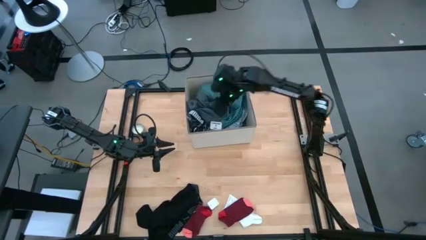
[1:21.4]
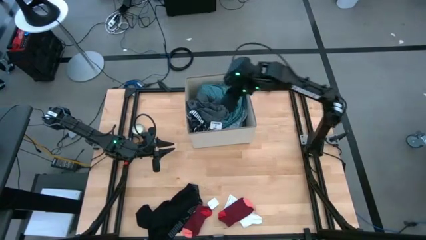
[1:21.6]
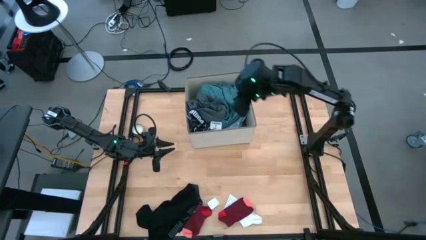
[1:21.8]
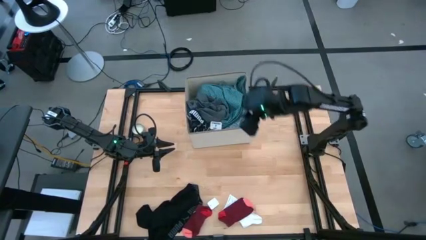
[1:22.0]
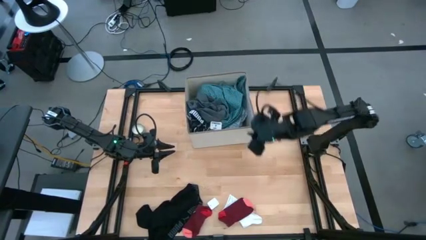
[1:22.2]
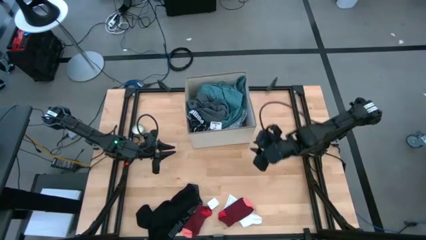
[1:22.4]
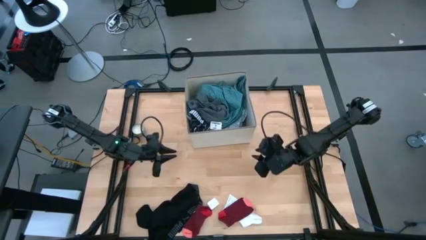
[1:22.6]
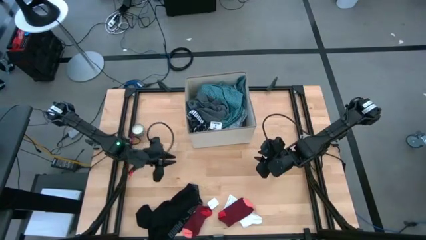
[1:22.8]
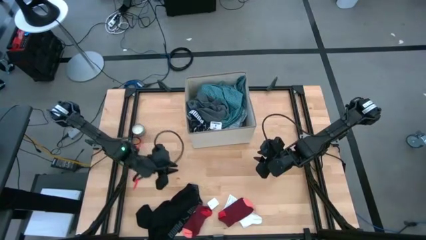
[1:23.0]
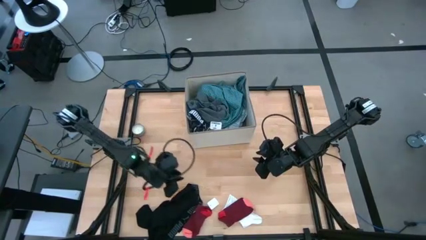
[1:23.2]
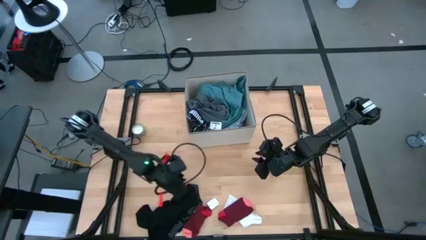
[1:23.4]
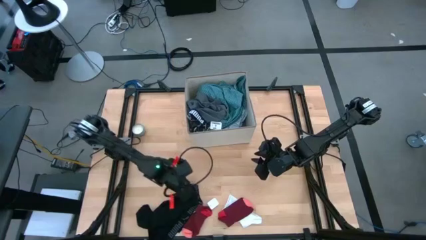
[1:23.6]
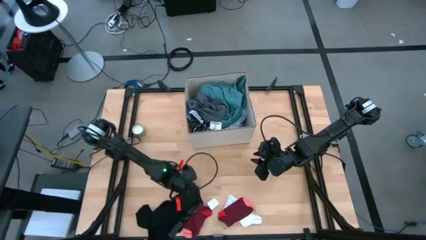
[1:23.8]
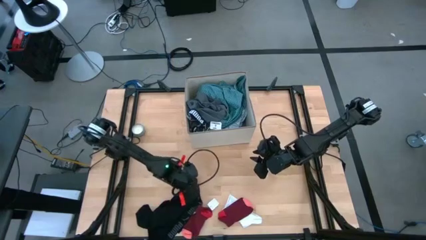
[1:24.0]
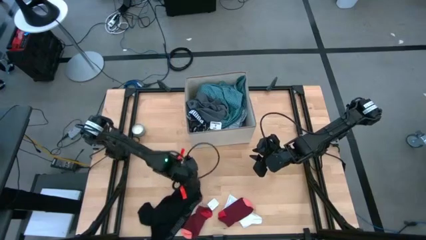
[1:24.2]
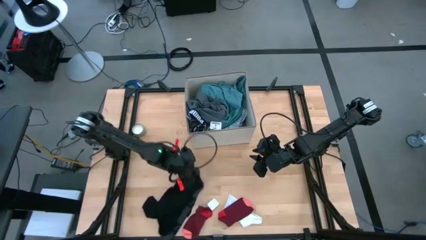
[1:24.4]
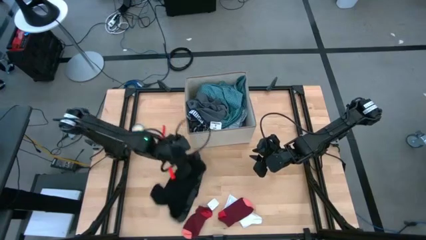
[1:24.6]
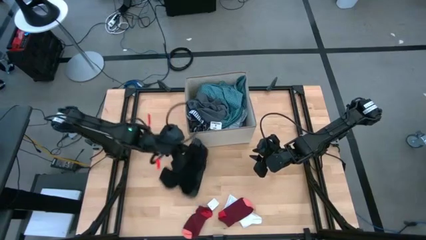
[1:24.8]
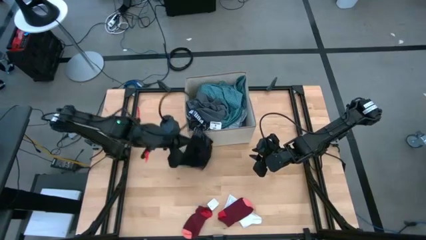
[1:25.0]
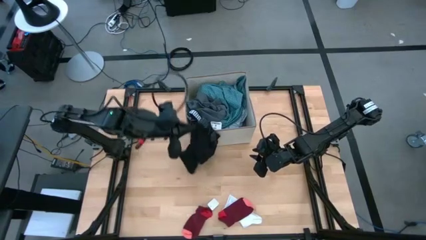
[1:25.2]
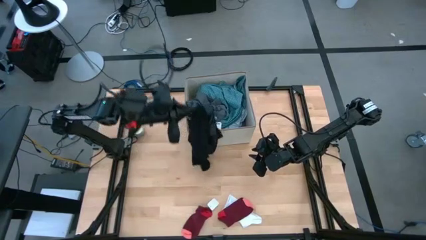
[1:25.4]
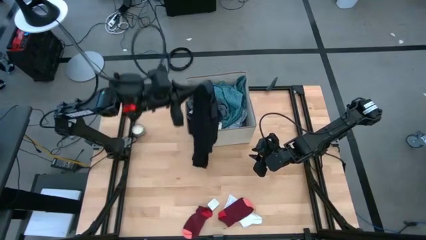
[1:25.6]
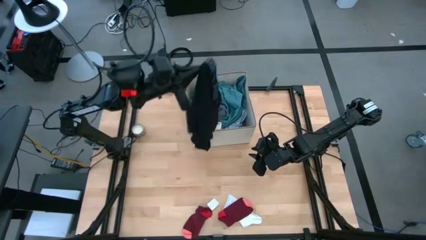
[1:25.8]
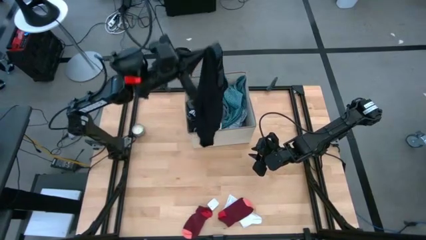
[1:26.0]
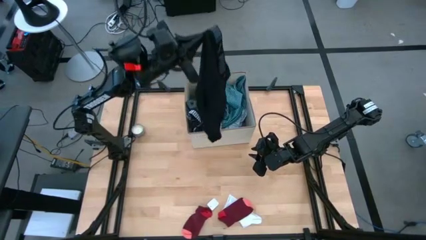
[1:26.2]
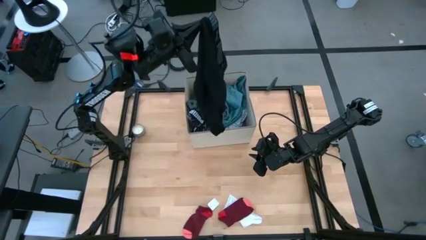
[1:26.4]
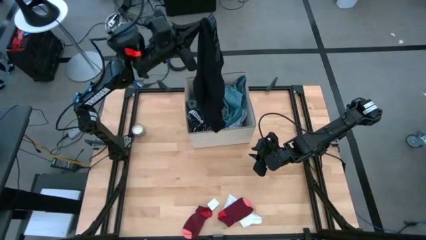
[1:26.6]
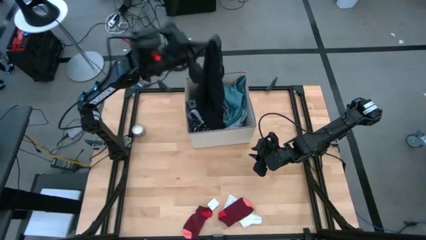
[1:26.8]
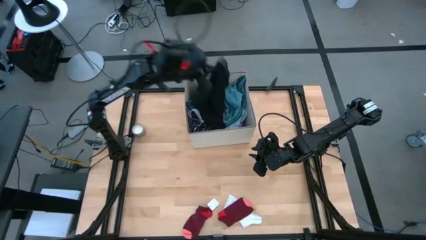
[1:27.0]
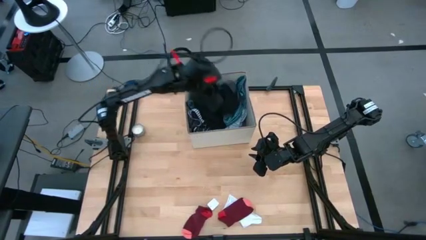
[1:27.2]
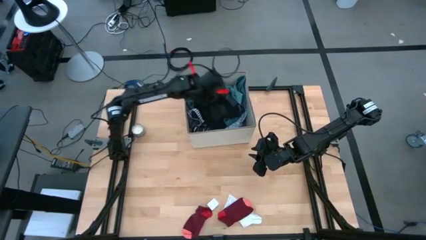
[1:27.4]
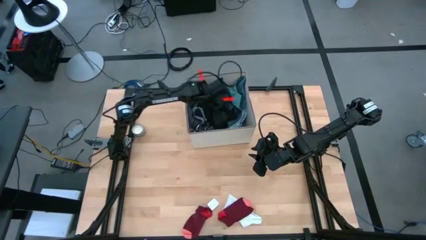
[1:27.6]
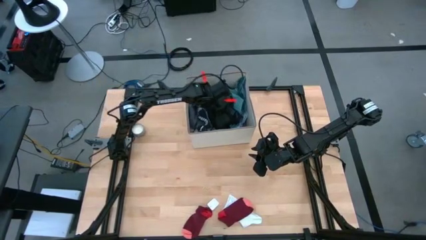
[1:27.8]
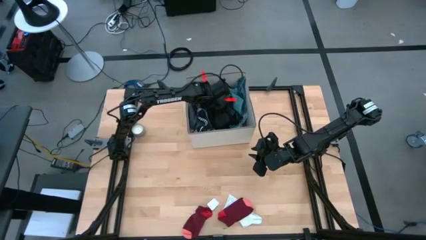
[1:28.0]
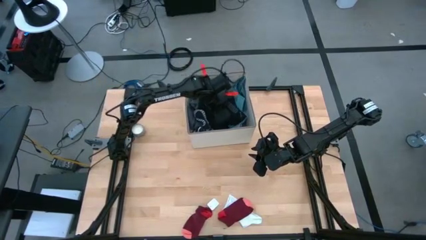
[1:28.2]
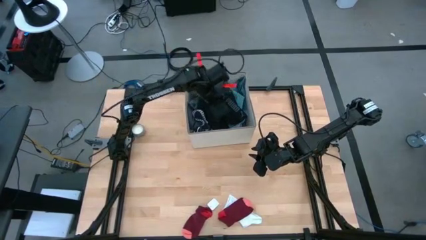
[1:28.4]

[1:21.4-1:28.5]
Task: Sort clothes
Put the black boxer into the laundry organizer

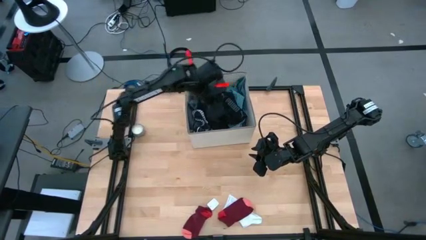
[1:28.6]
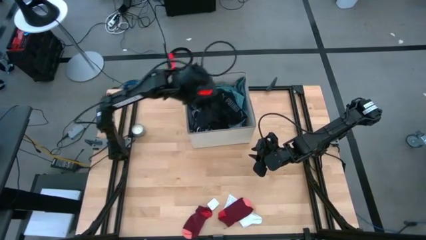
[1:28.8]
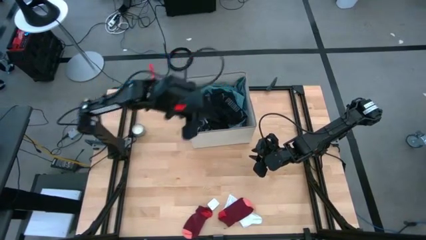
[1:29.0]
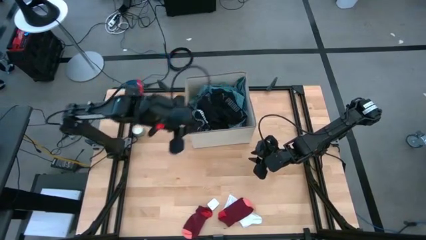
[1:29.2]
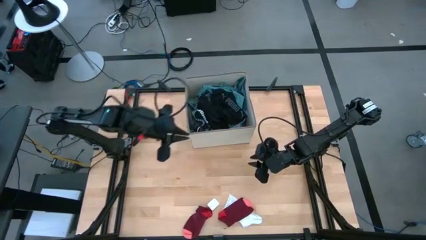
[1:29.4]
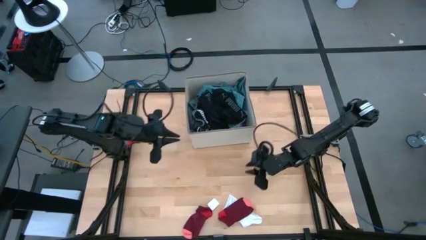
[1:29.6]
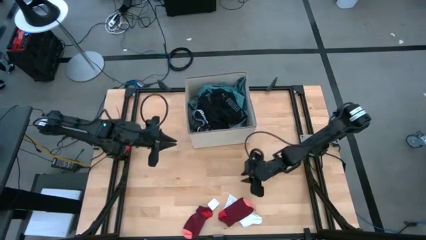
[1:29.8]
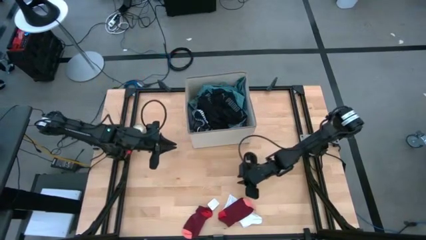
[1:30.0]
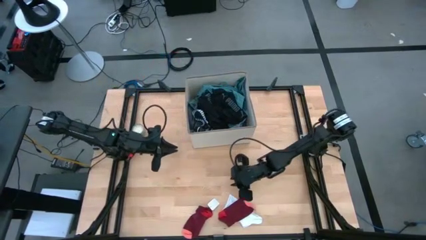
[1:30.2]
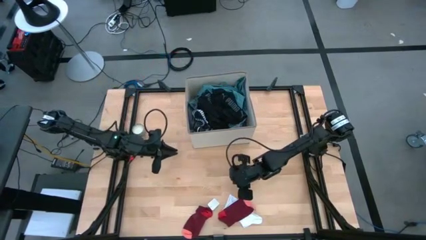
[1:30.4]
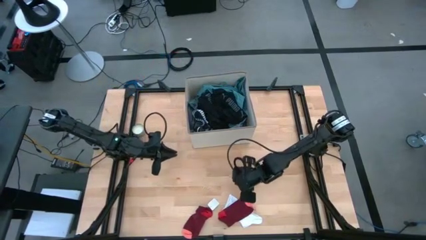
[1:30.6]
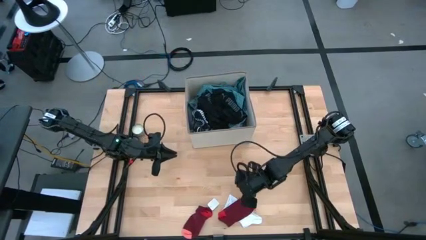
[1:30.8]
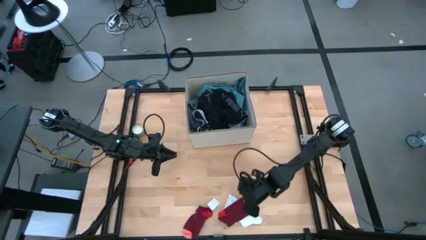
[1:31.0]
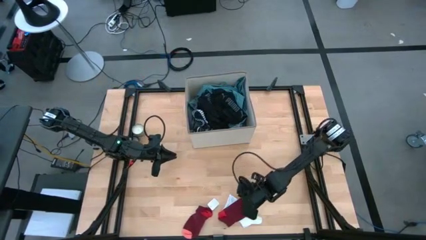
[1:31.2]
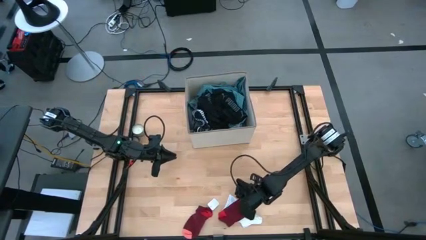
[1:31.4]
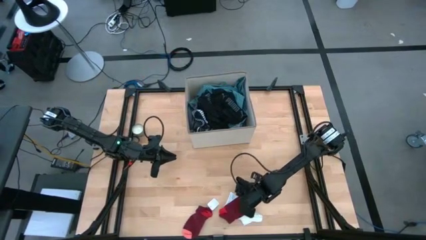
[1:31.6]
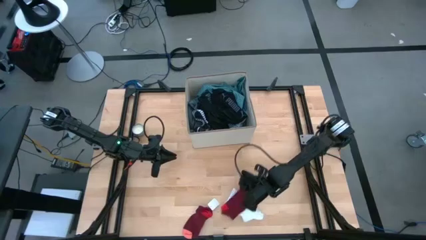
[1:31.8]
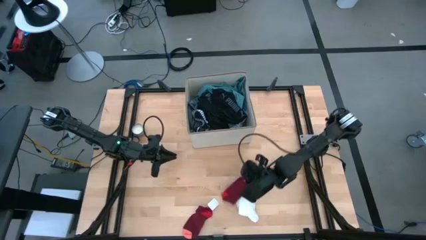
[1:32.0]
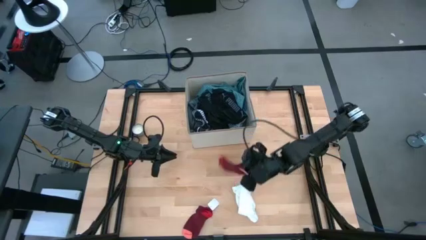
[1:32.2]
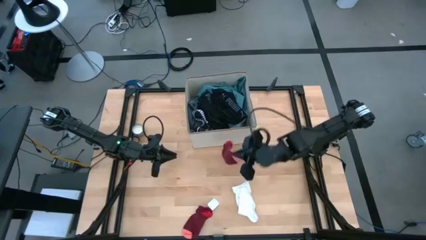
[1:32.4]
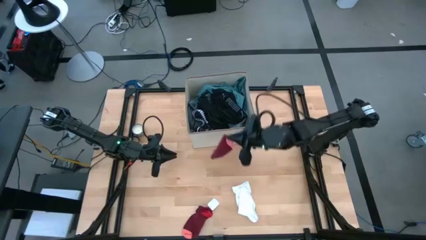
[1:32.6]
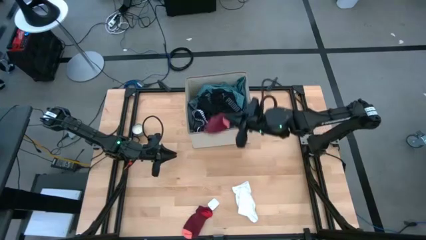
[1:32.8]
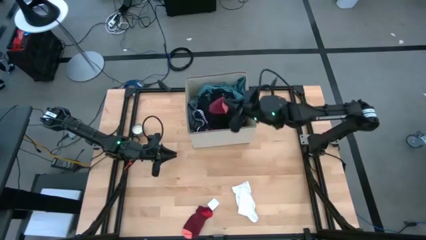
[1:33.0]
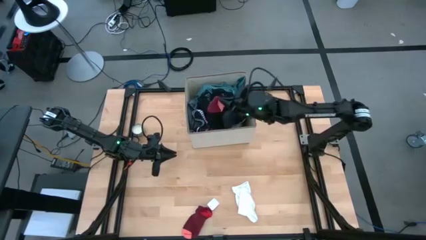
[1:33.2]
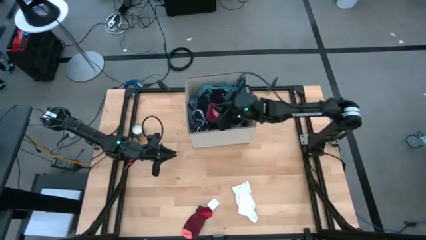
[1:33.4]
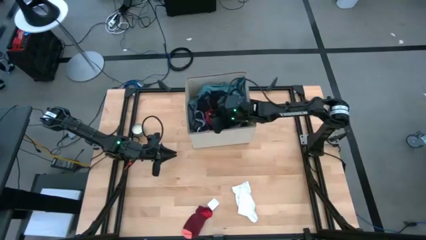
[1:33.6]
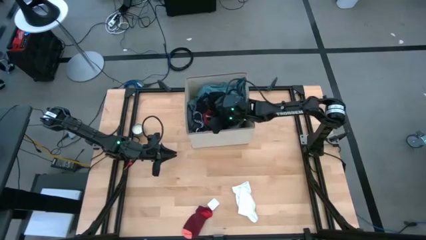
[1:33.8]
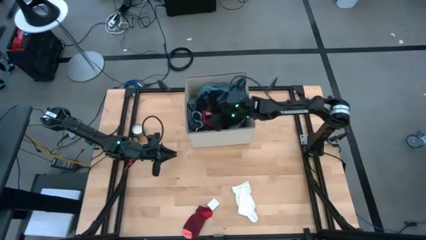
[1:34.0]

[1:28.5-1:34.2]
Put the right red sock into the laundry organizer

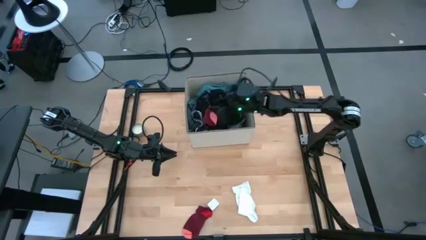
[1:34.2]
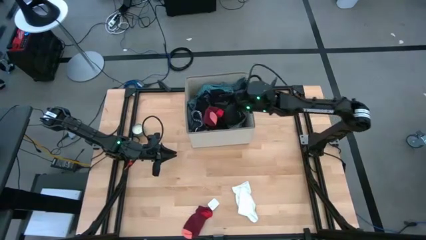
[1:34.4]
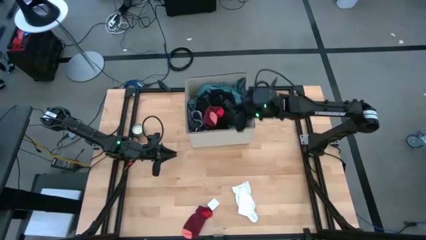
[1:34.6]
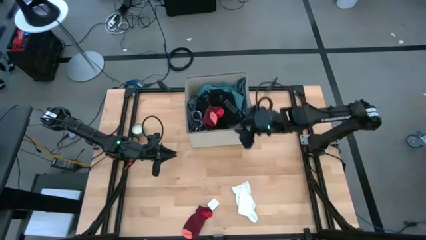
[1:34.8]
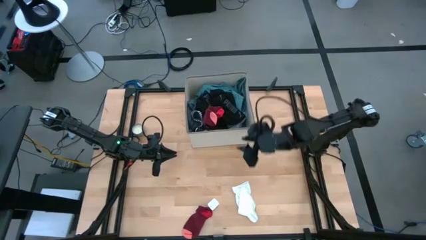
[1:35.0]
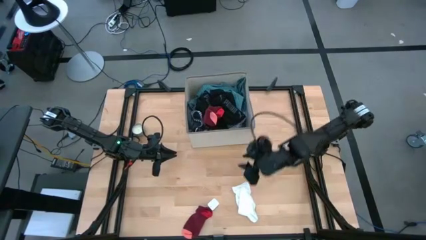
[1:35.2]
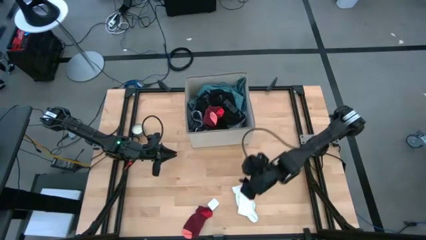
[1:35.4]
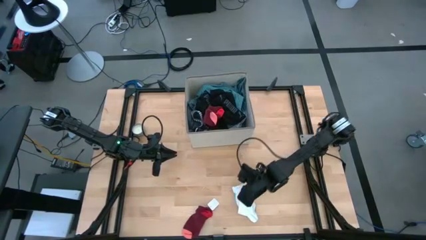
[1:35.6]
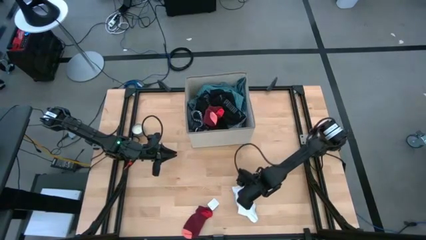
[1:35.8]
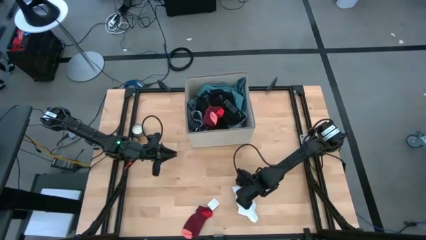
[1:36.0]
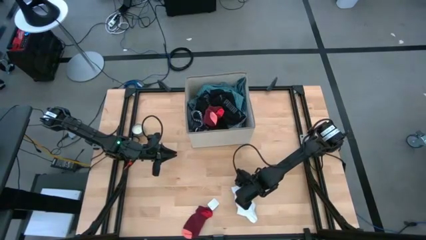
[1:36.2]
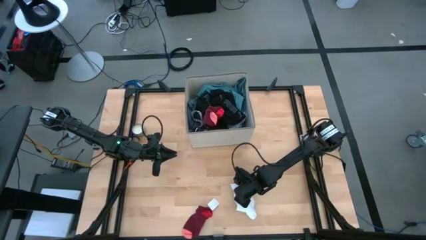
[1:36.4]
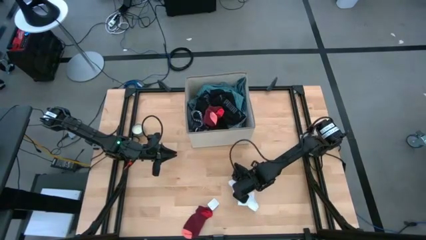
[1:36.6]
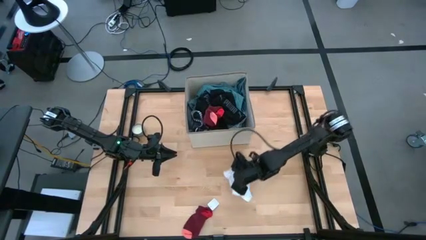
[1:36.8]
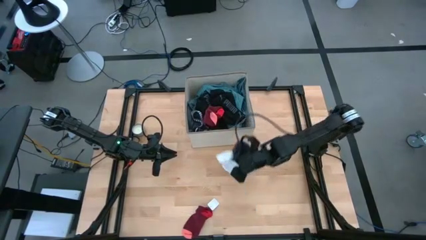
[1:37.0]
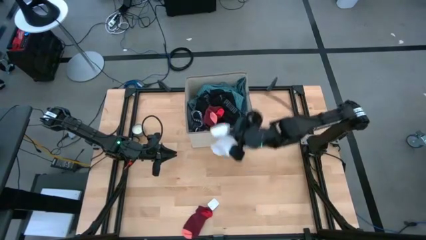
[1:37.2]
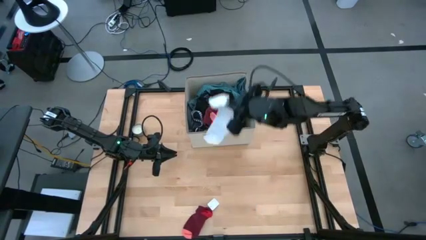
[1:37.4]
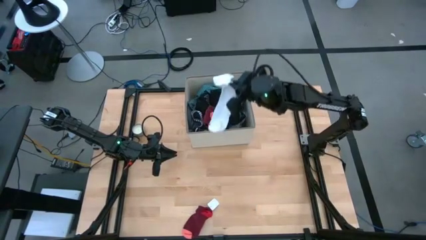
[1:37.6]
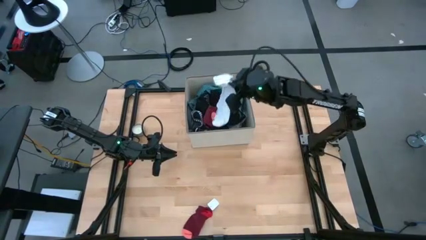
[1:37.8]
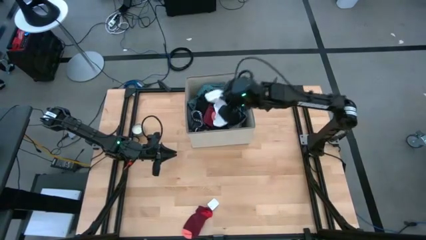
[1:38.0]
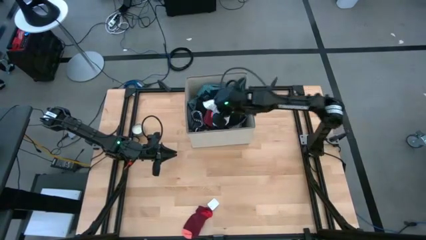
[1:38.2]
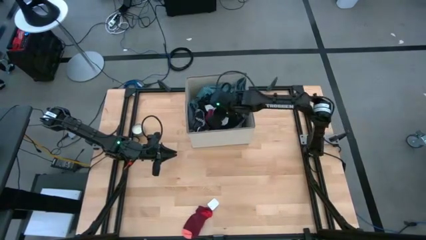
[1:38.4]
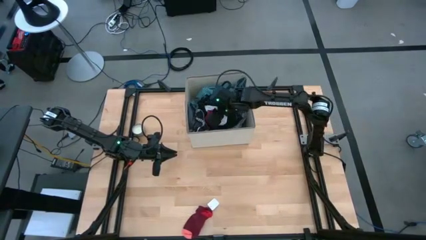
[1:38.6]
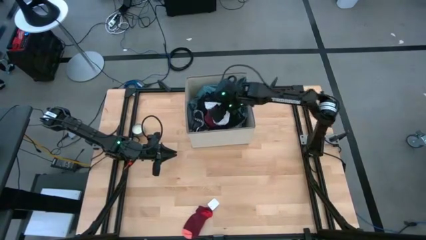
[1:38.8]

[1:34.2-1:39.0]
Put the white sock into the laundry organizer
